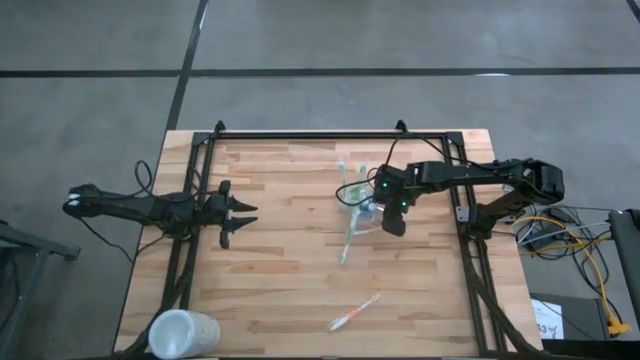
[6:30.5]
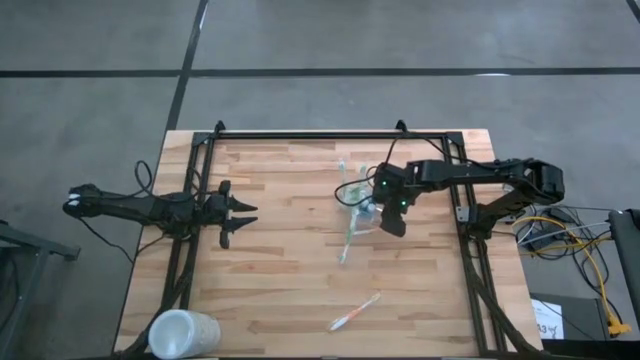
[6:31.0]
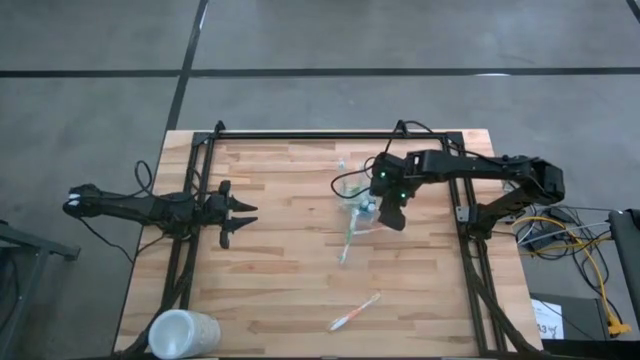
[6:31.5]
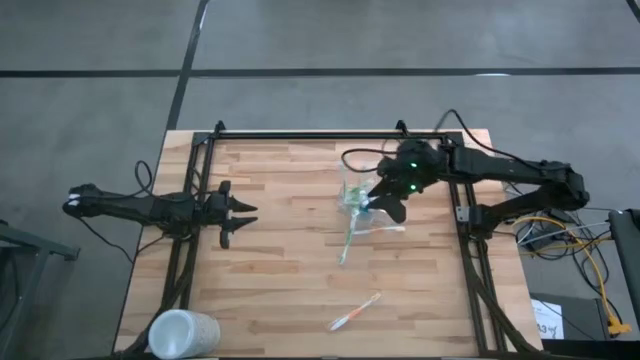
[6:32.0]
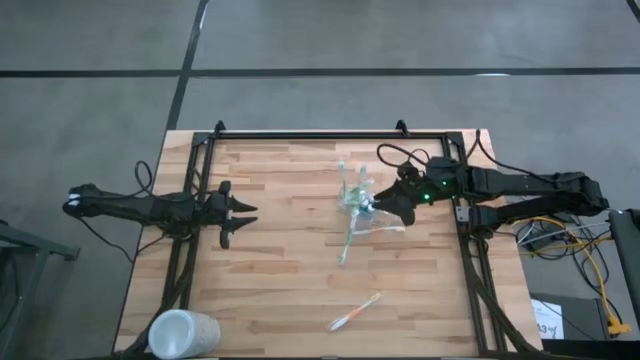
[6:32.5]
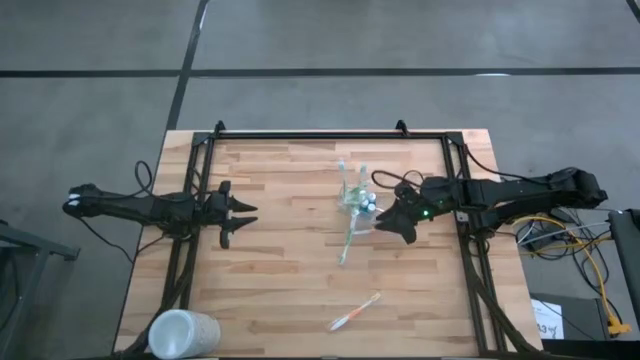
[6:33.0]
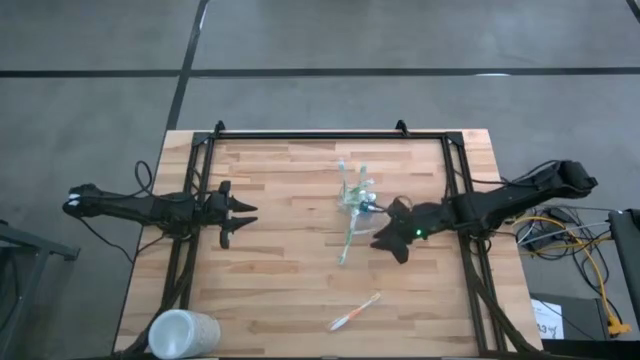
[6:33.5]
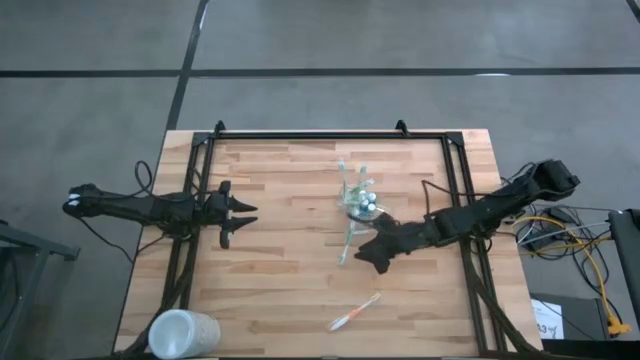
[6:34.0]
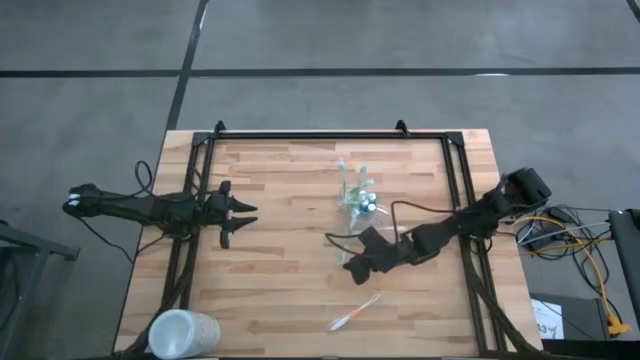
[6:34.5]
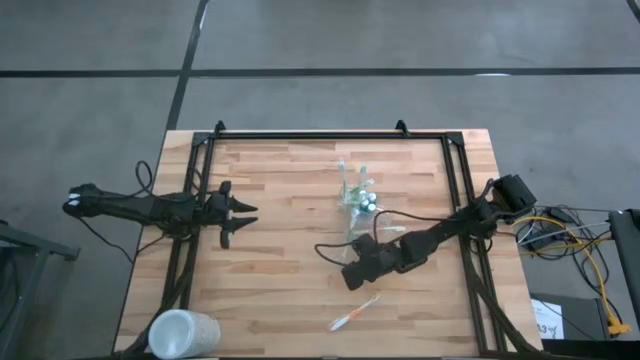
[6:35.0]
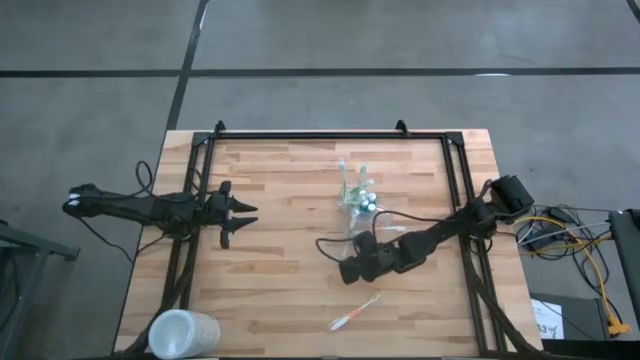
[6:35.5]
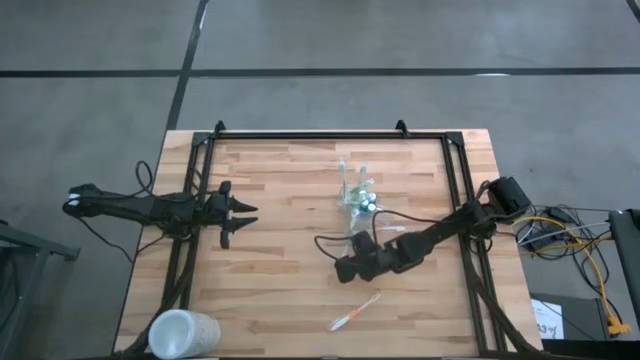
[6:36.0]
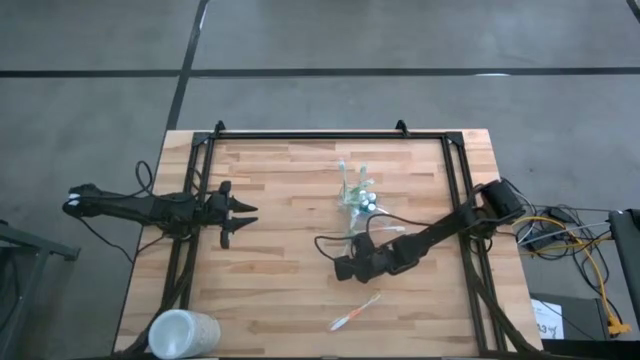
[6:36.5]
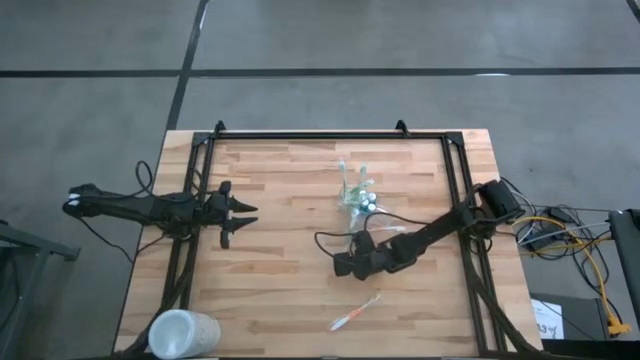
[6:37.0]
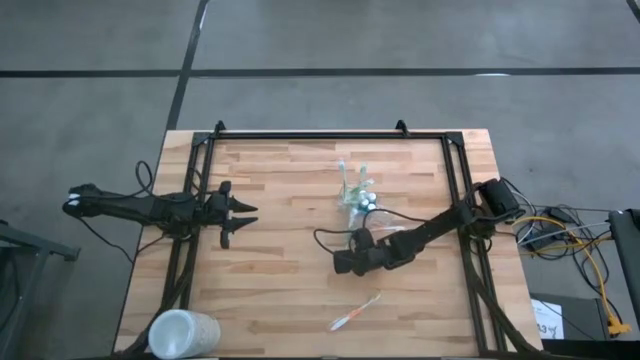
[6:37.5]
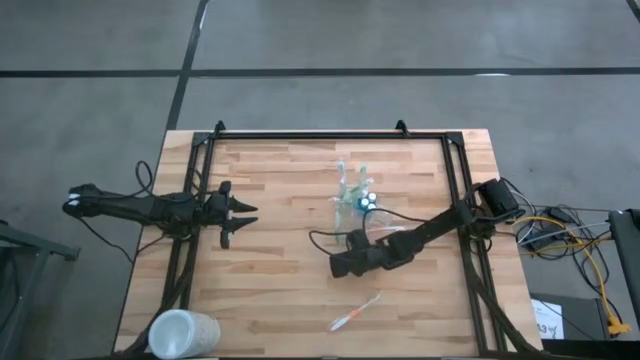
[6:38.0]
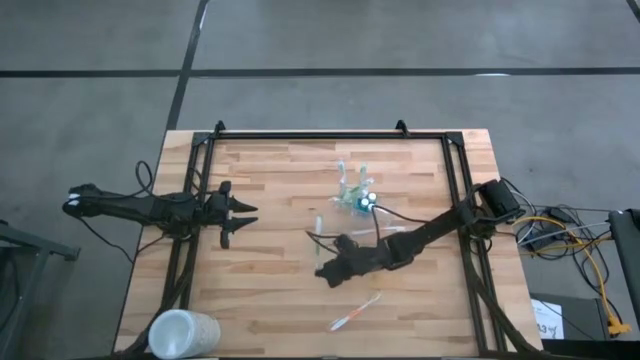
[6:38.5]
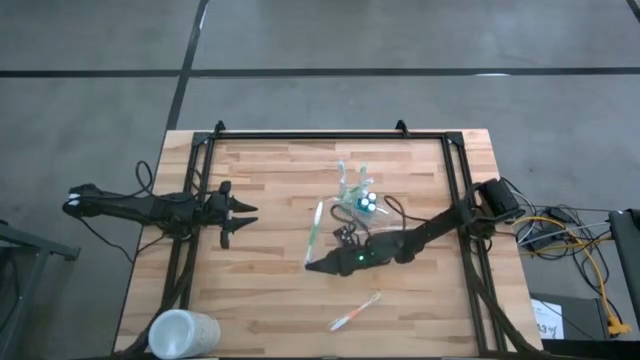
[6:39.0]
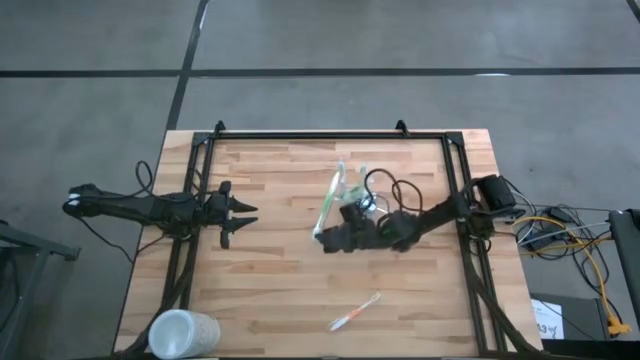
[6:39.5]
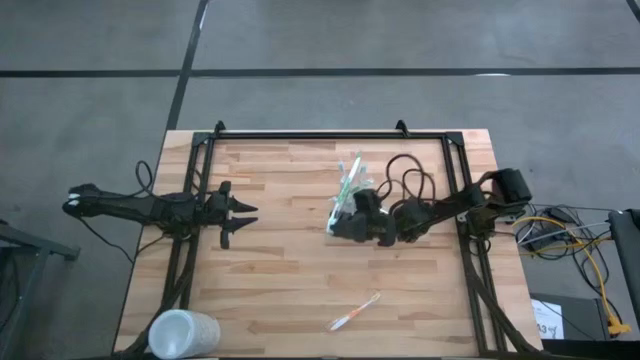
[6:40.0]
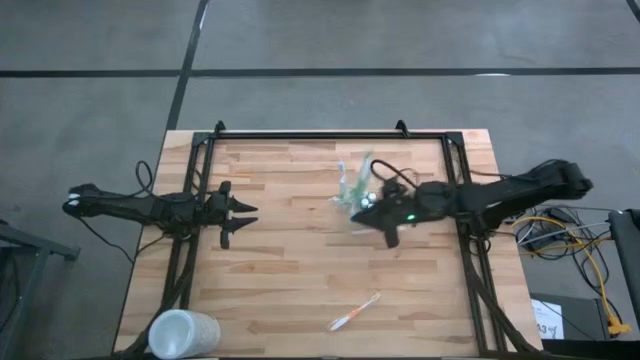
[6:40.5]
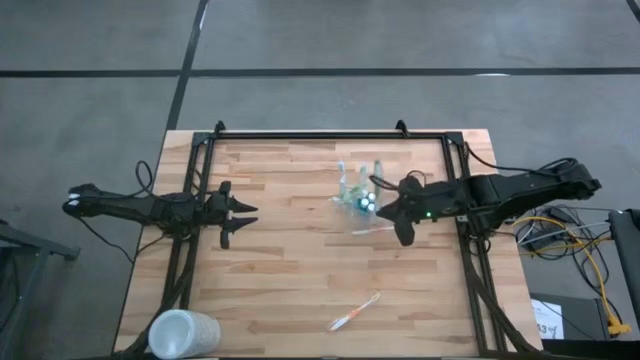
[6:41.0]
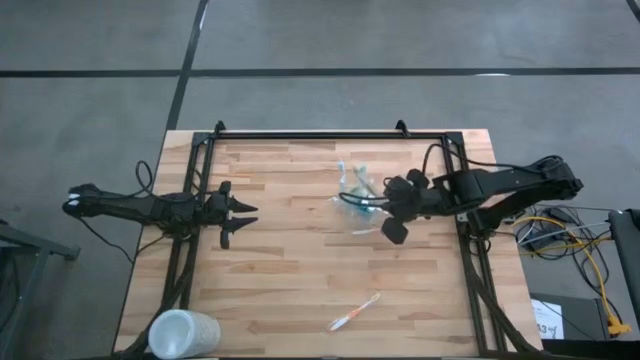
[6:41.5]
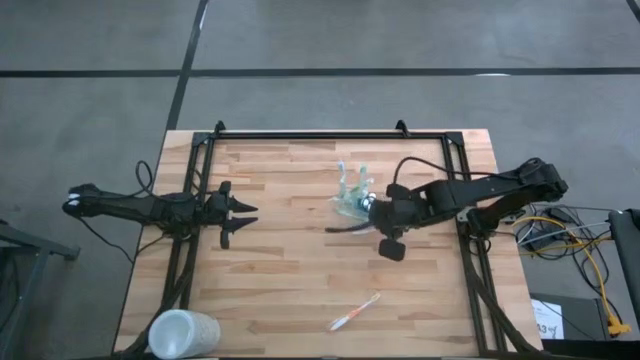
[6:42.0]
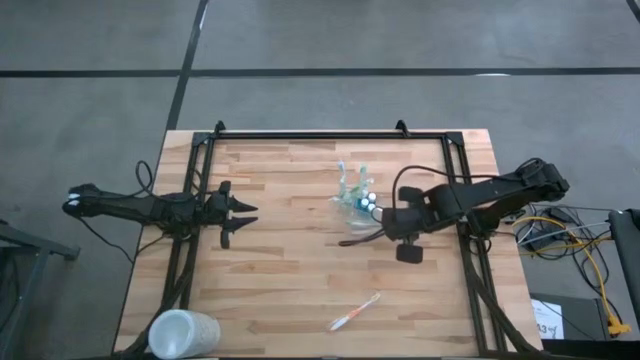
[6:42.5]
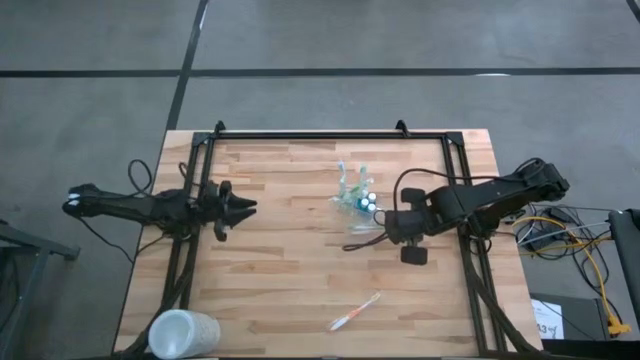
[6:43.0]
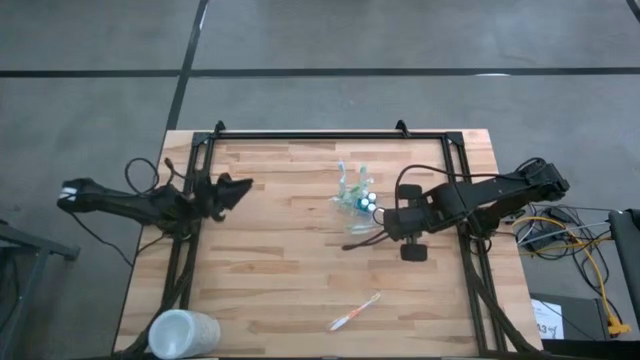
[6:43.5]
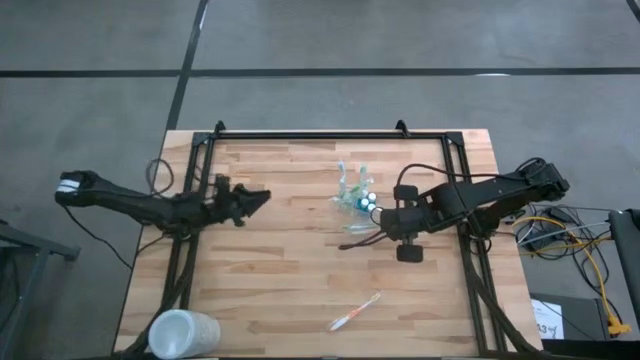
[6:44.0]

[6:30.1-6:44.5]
Task: Pick & Place toothbrushing station
Put the green toothbrush into the transparent organizer

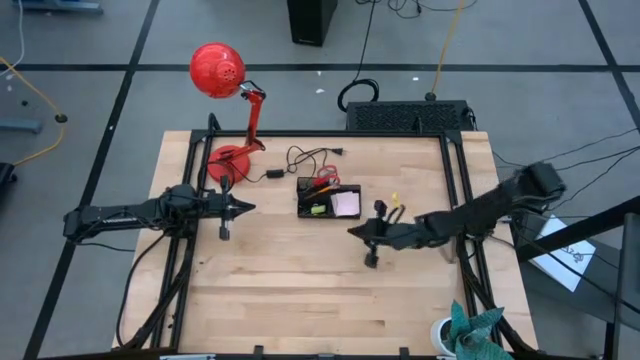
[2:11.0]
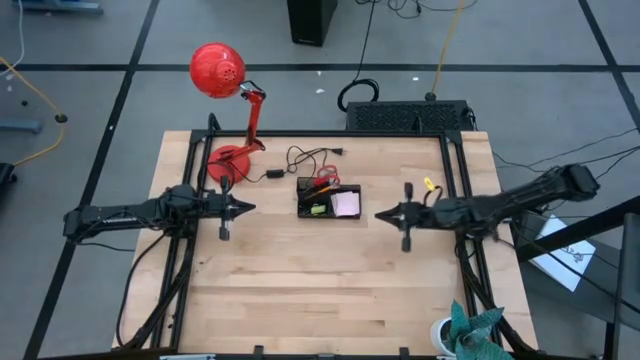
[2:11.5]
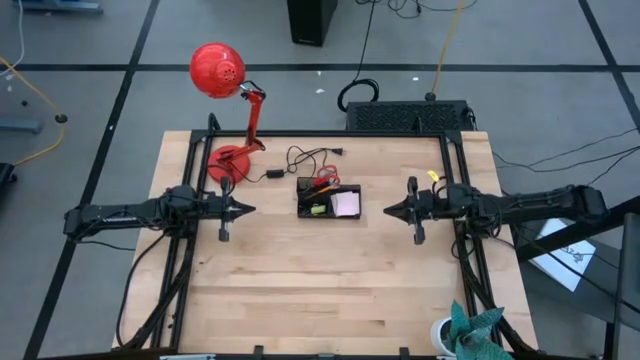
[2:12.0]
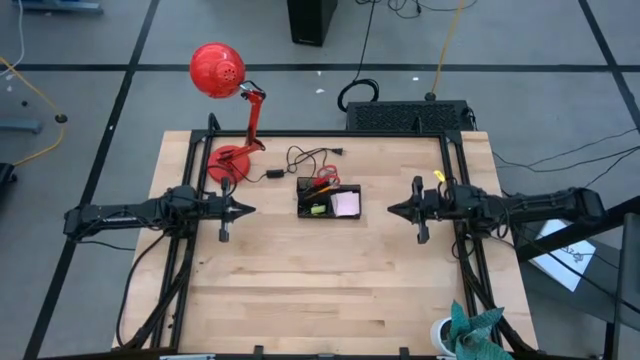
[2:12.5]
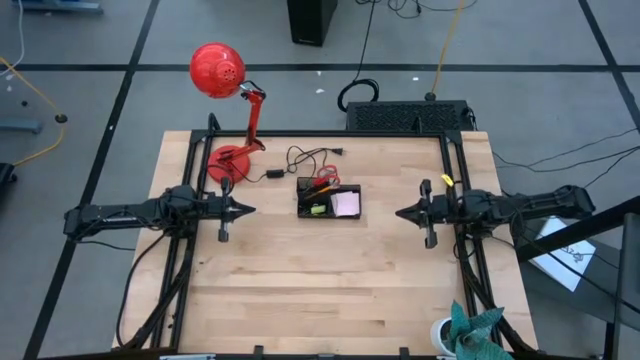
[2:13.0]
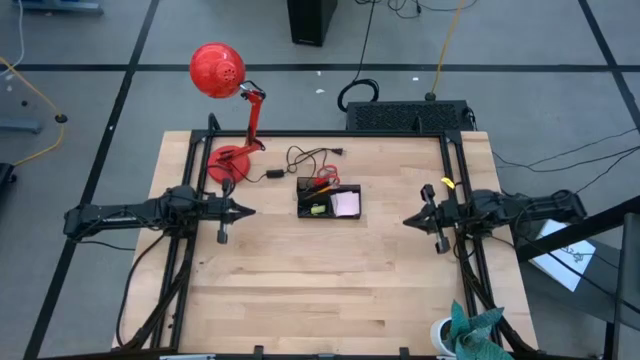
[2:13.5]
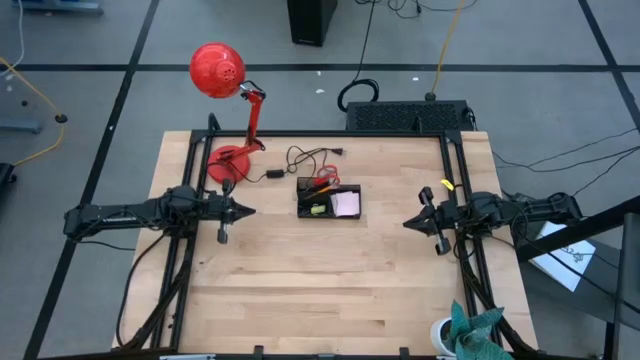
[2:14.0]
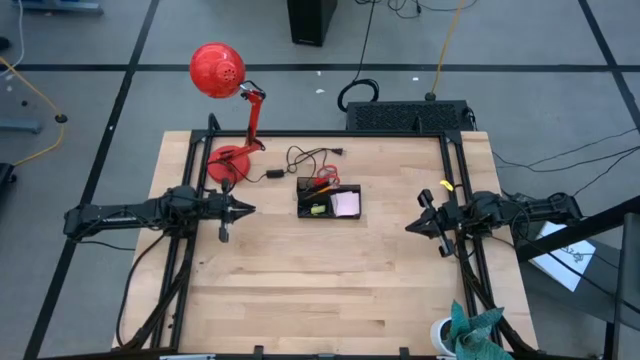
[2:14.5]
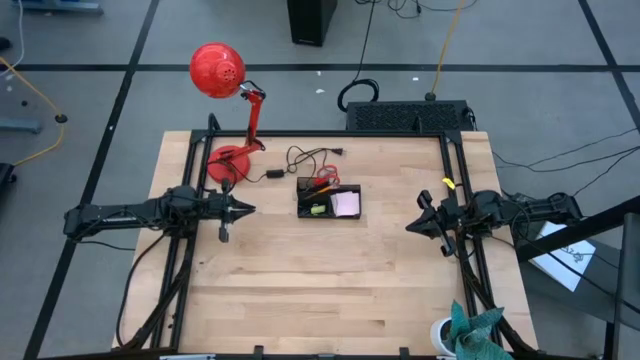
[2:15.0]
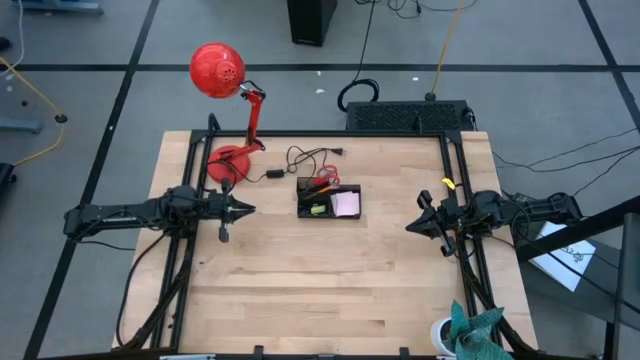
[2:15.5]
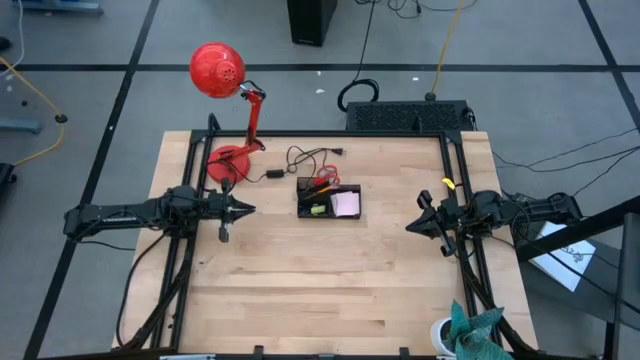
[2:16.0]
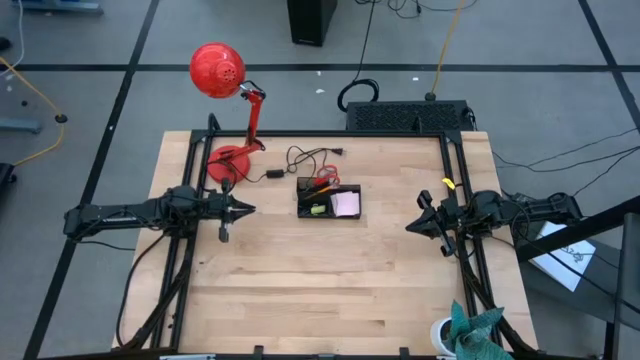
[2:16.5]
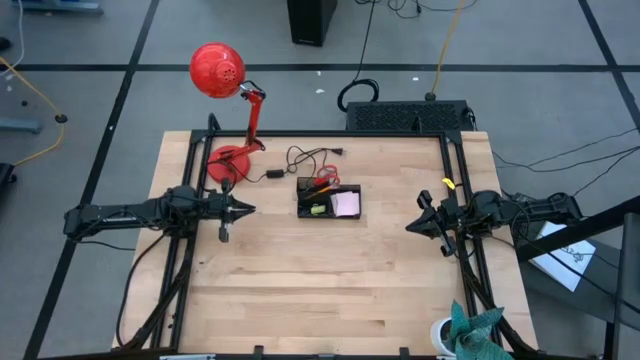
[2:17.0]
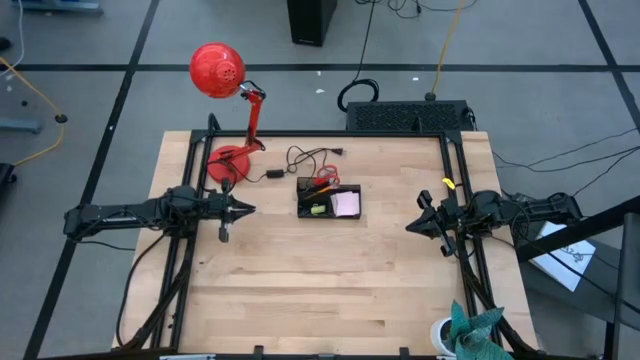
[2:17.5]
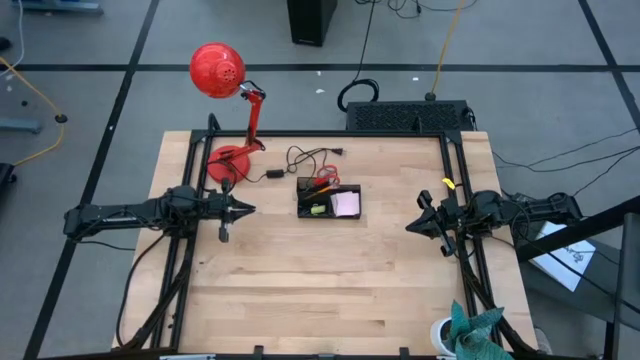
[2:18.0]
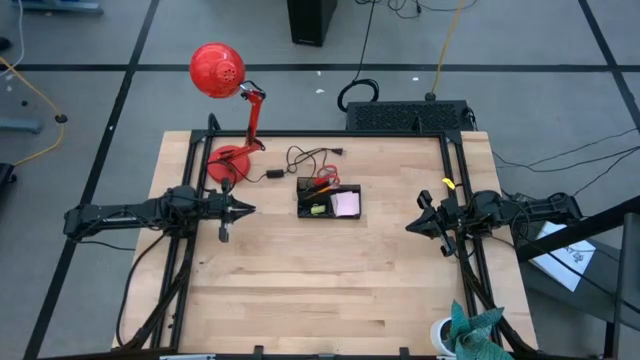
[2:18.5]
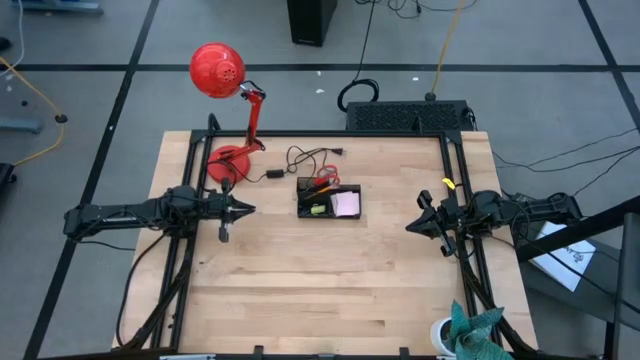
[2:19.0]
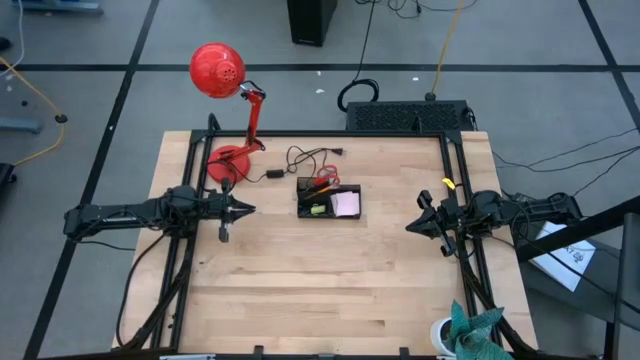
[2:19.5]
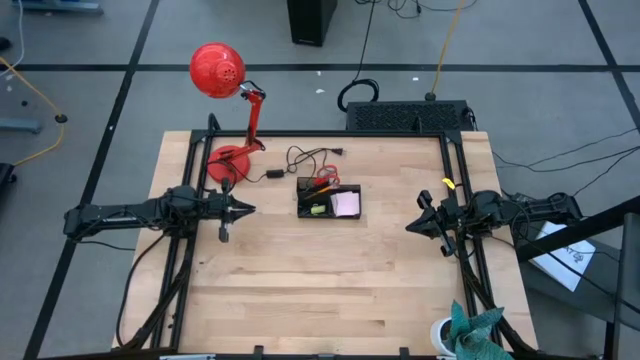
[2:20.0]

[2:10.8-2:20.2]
Task: Pick and place office supplies into organizer
Return to Home Position
